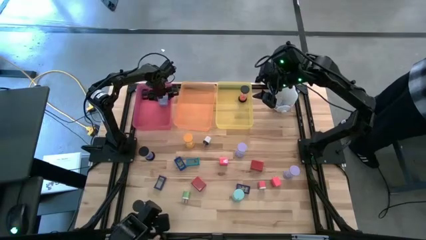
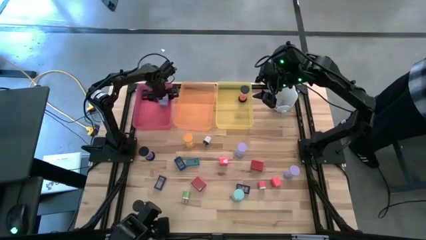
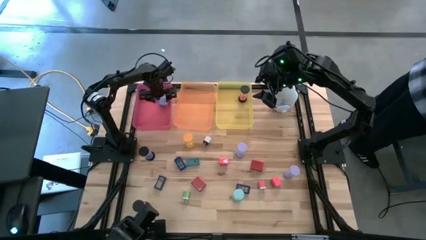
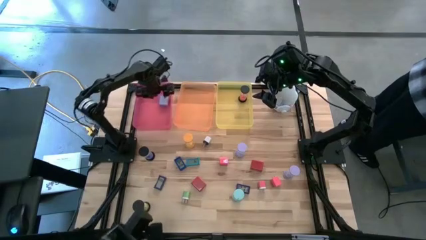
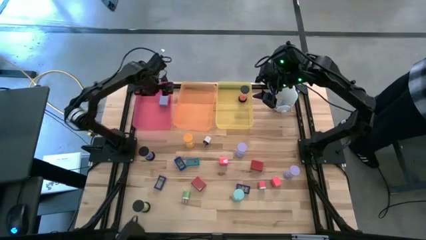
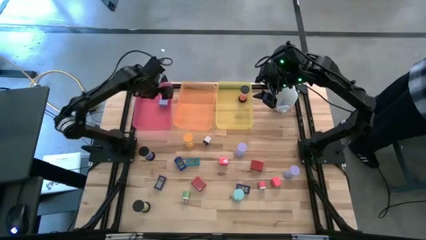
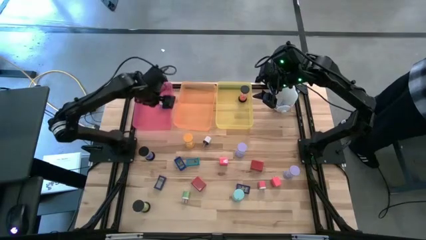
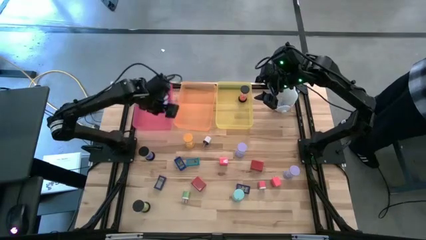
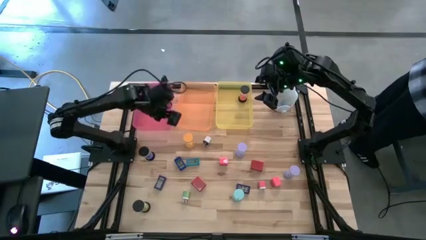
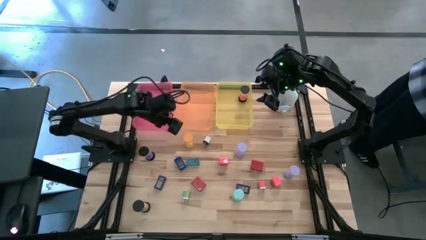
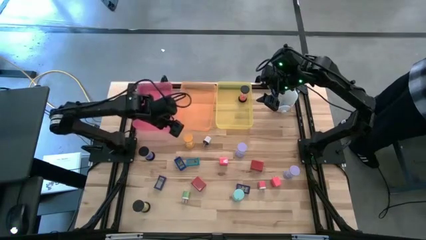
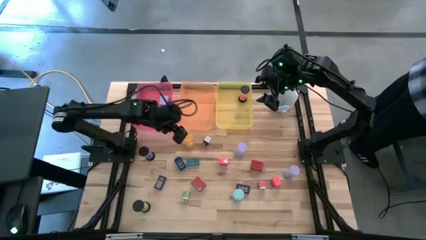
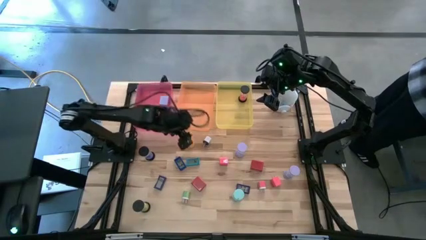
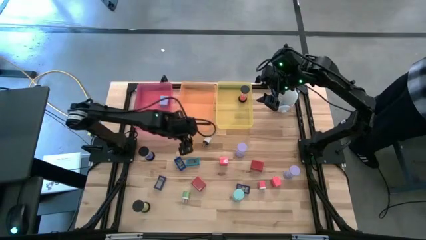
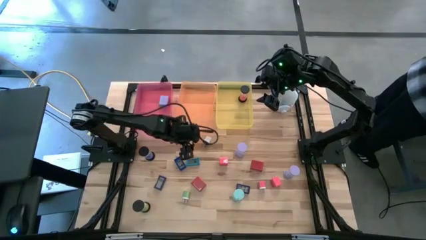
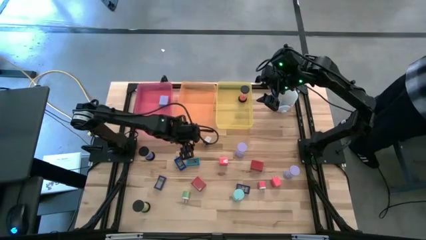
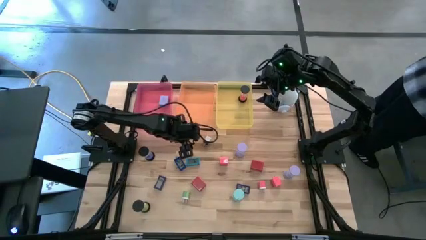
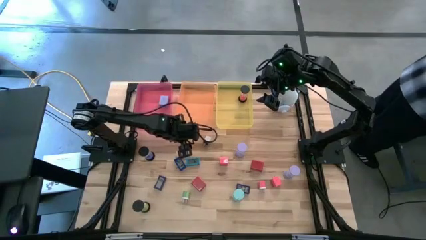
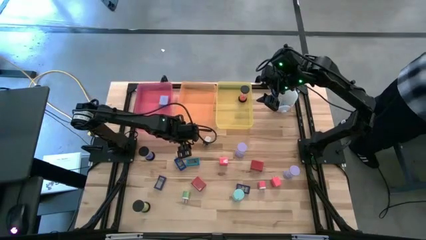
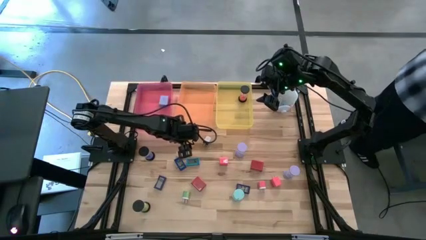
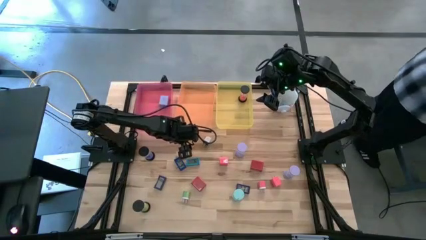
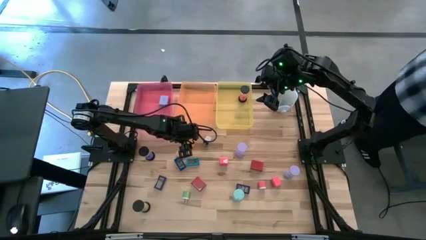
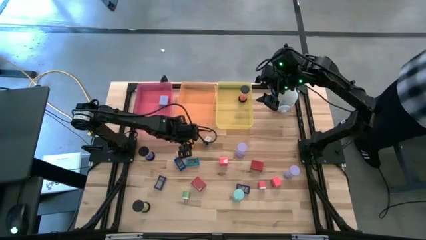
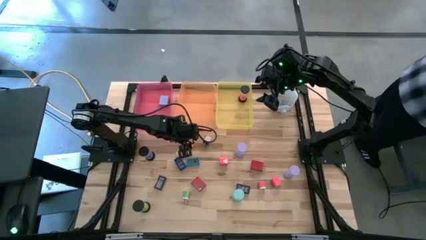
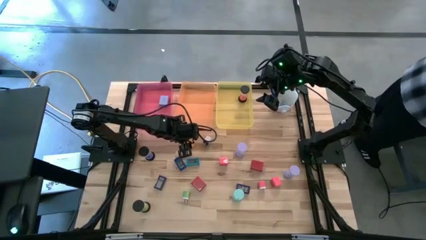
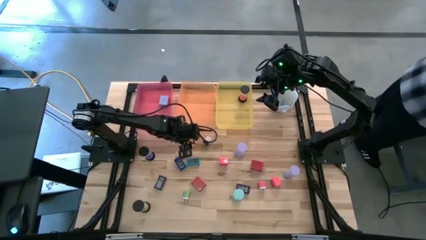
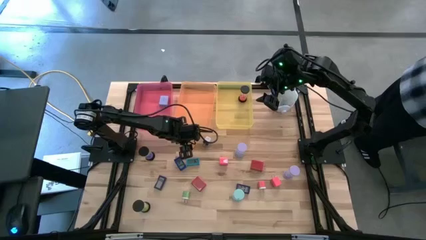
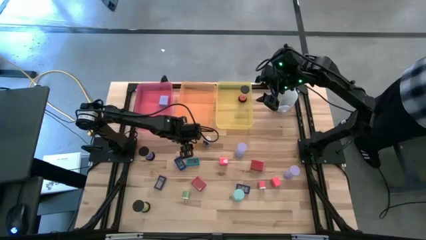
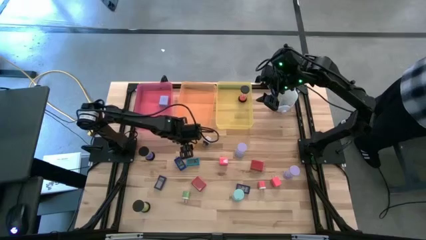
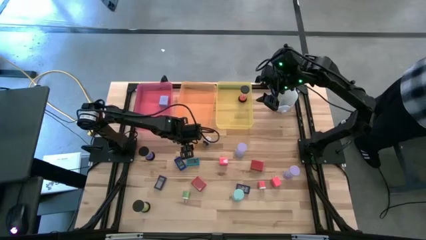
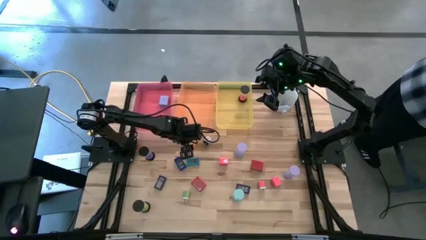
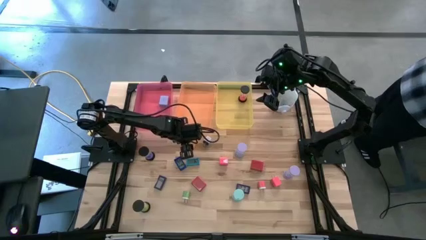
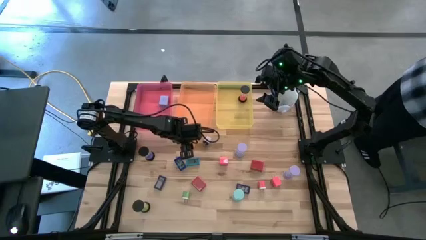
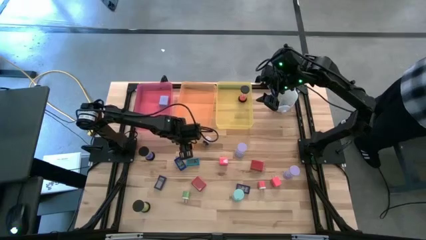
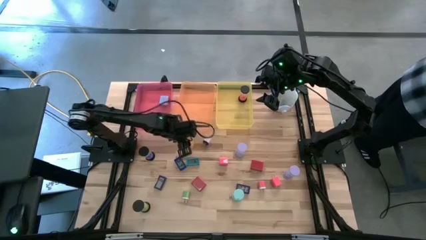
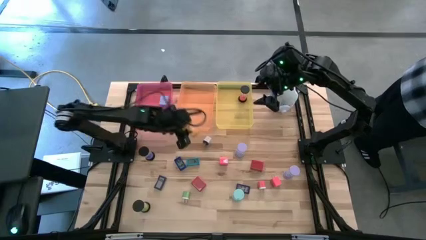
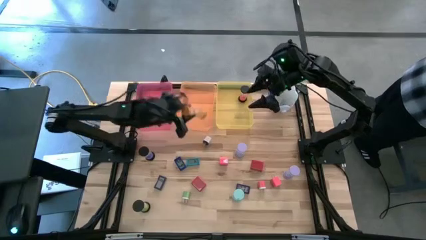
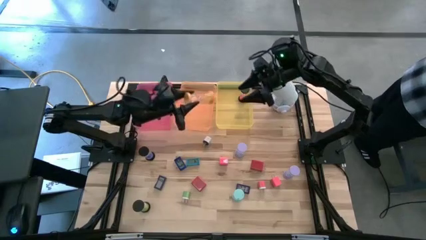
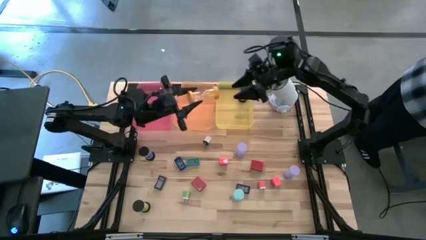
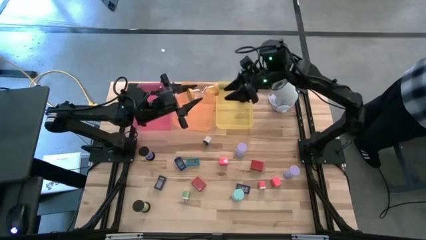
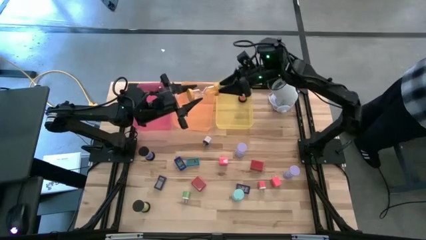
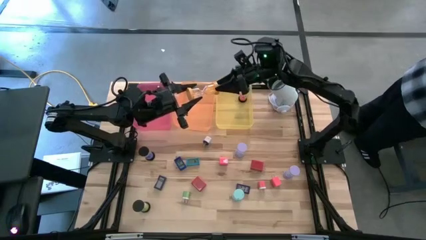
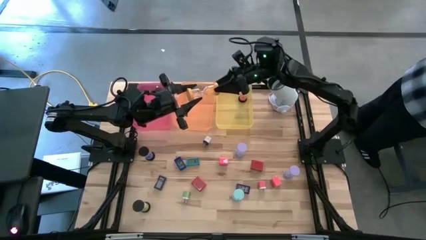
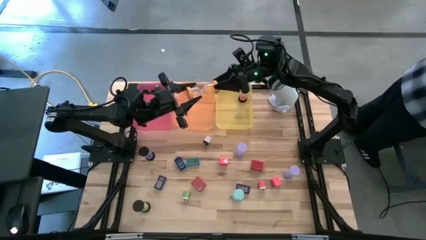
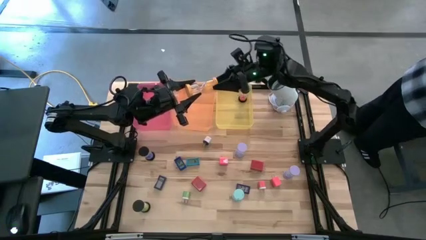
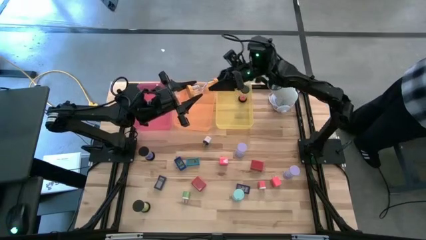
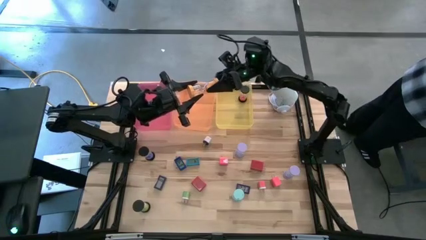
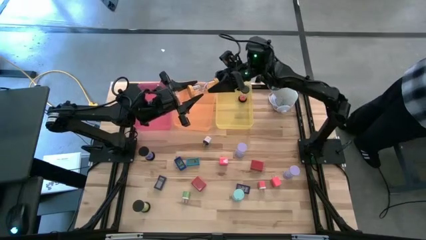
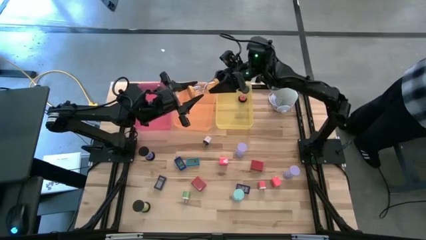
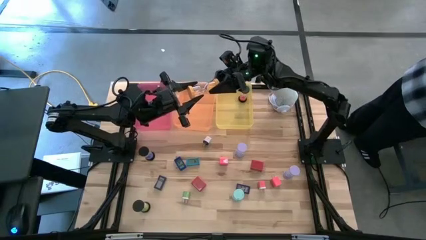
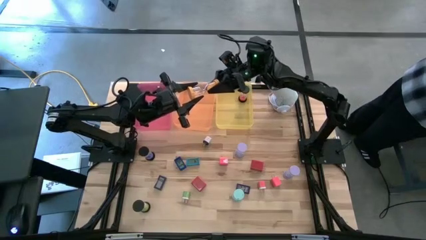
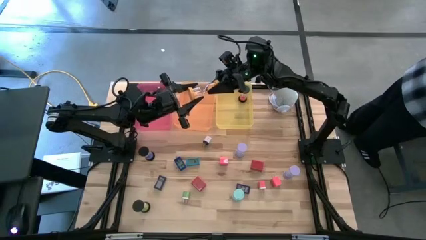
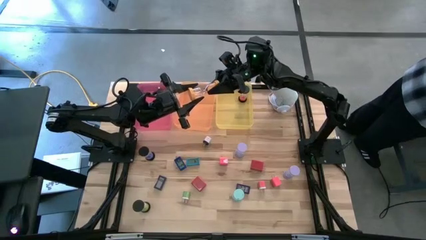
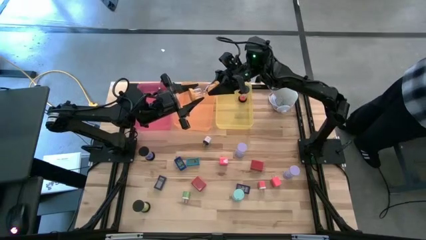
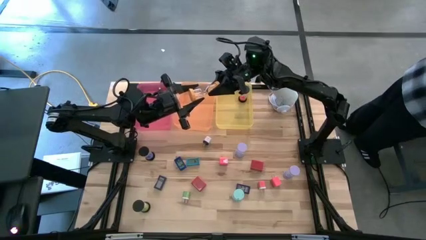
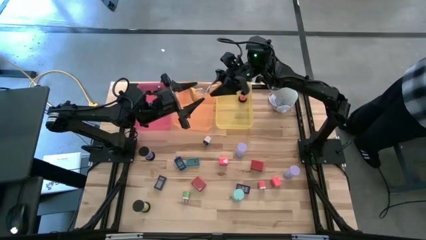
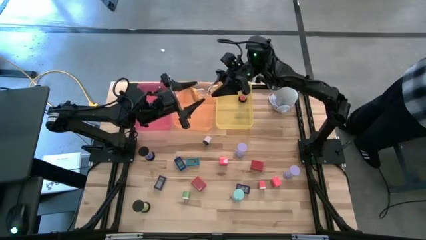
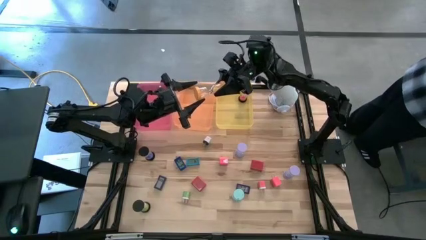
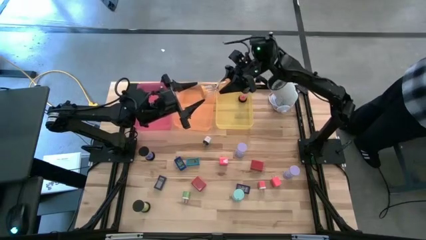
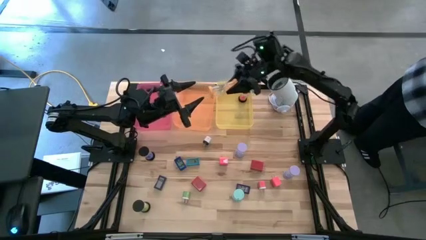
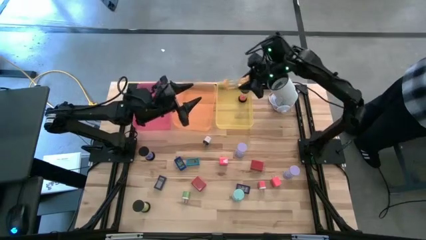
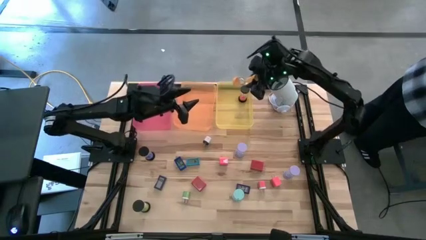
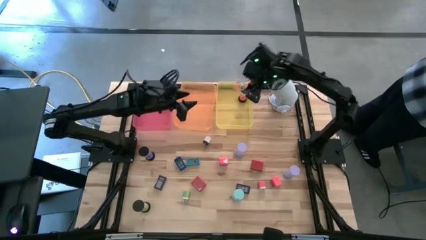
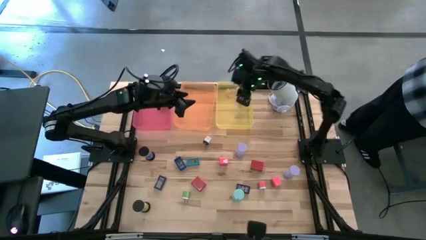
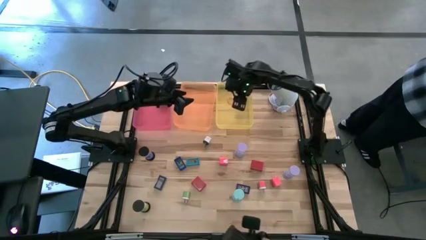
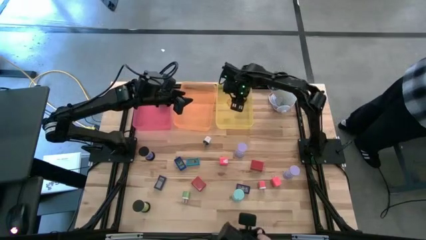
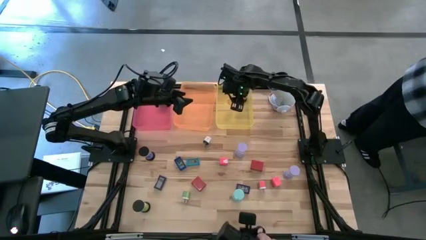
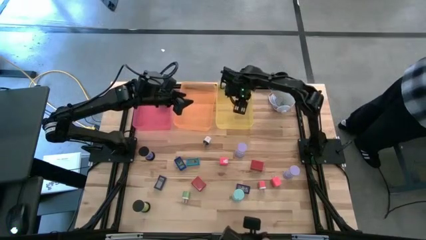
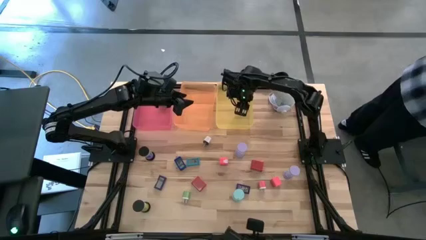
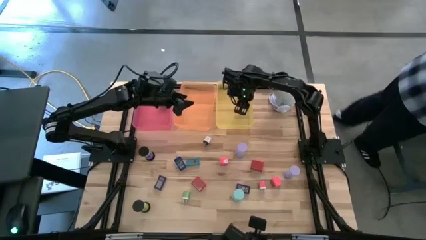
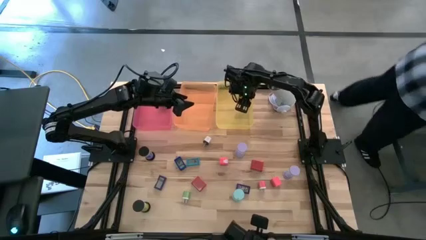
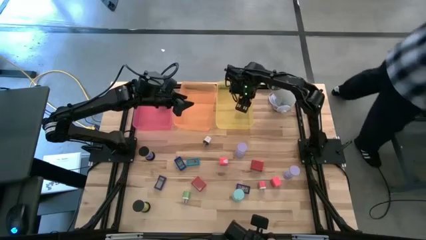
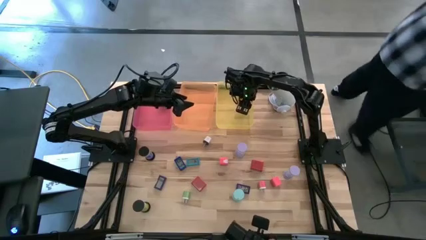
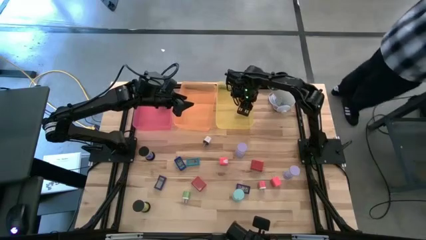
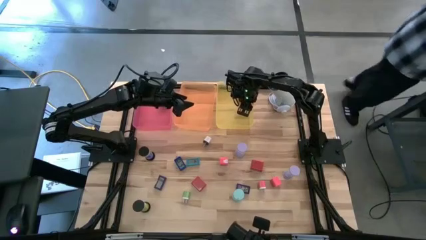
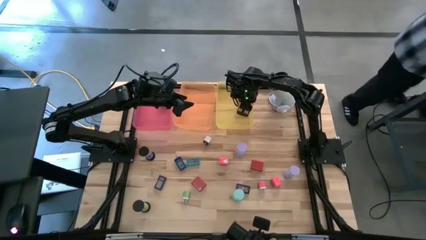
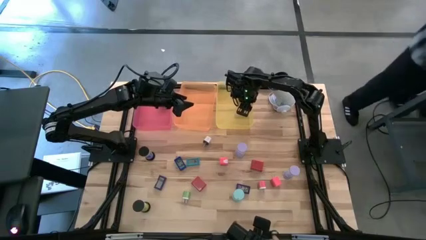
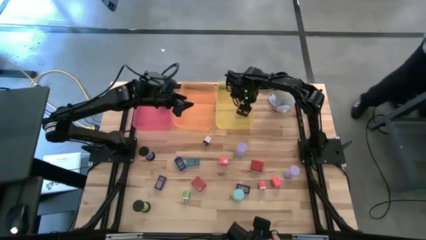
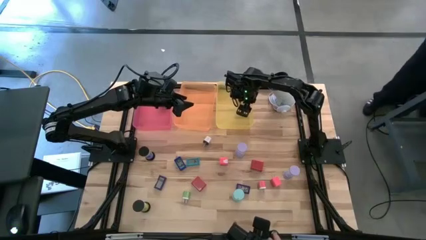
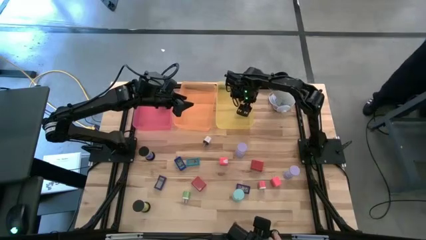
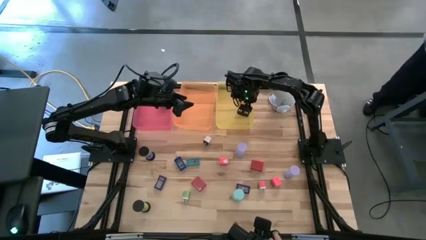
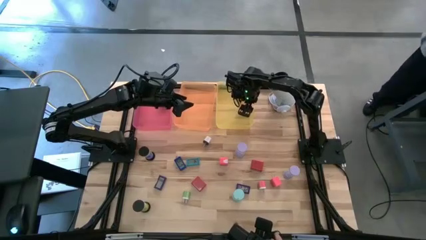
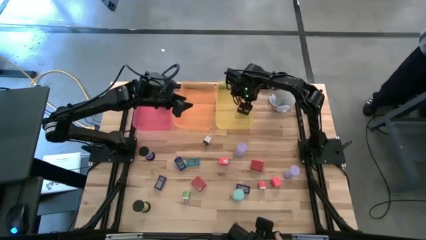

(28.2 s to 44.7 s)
Task: Pick & Place Office items
Put the orange hourglass into the yellow bin
